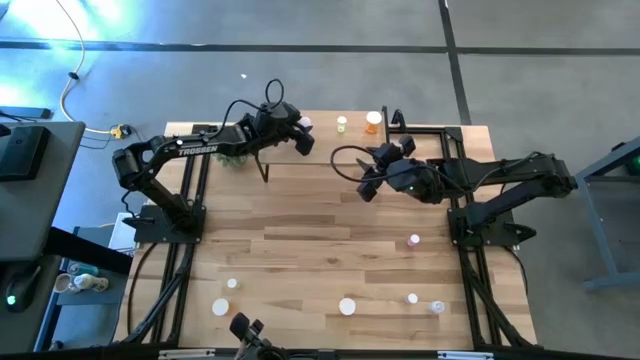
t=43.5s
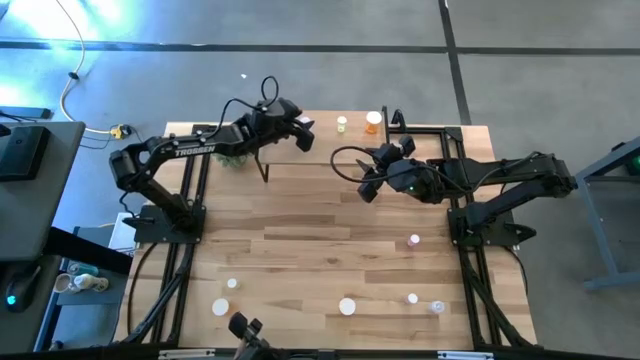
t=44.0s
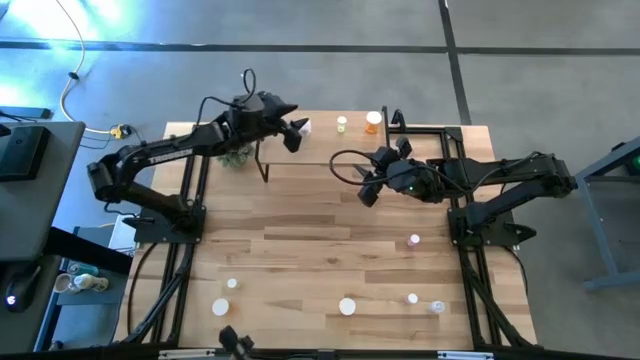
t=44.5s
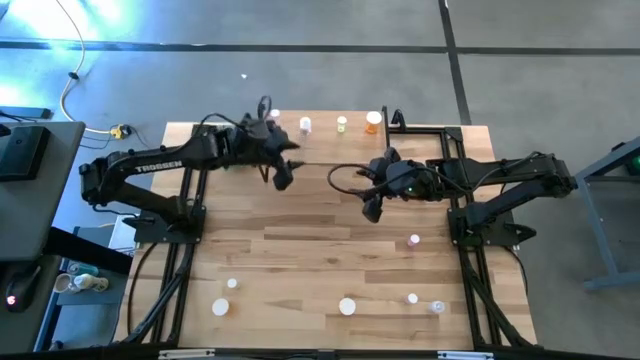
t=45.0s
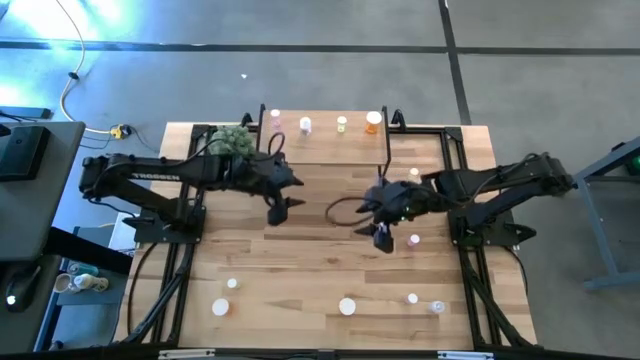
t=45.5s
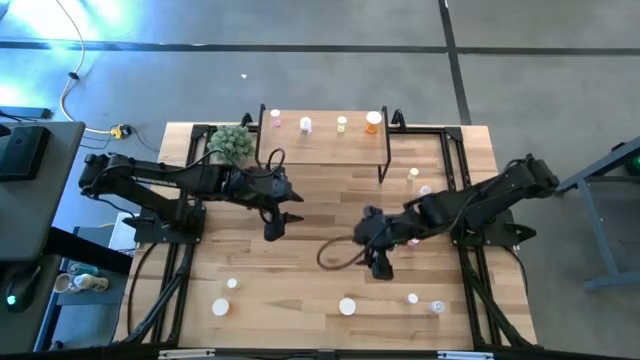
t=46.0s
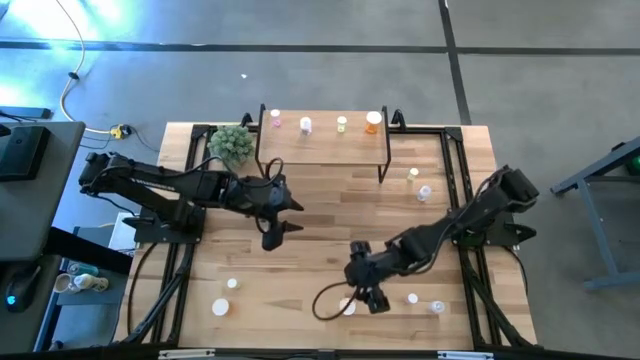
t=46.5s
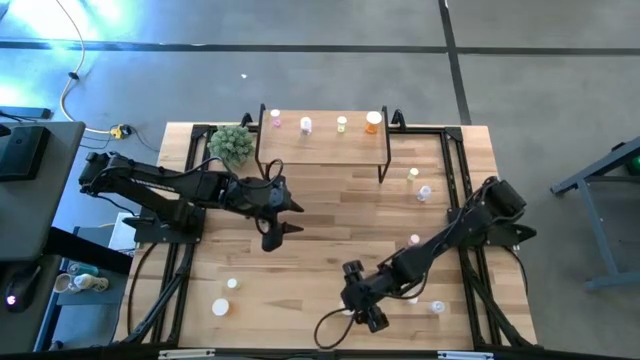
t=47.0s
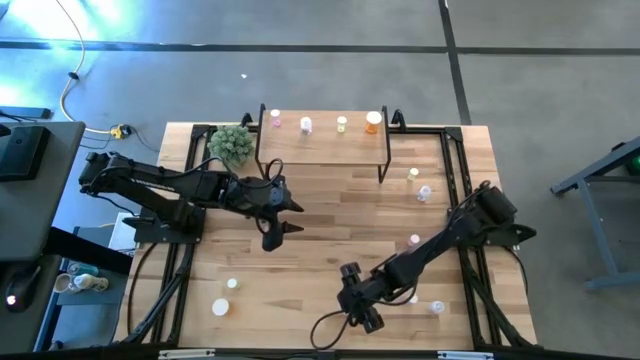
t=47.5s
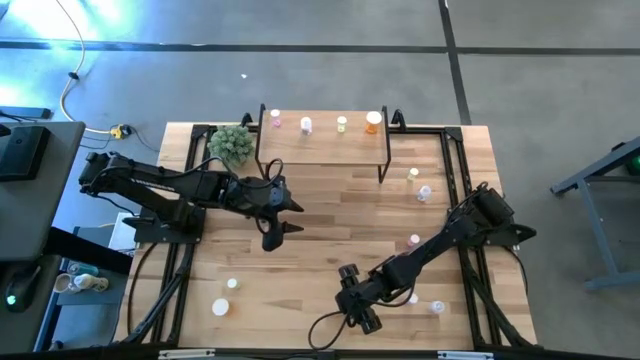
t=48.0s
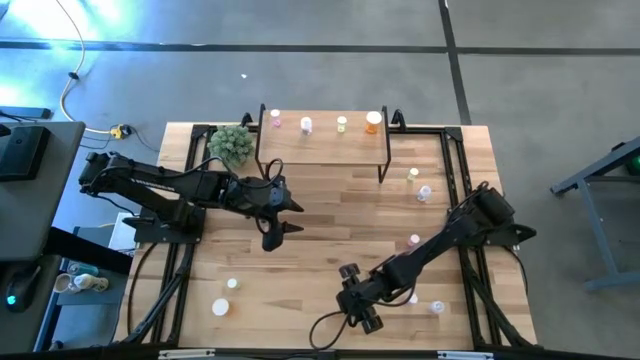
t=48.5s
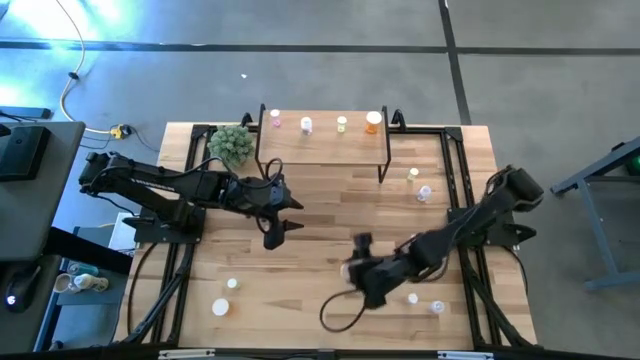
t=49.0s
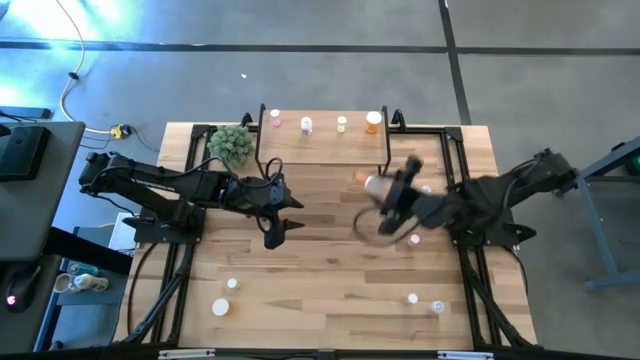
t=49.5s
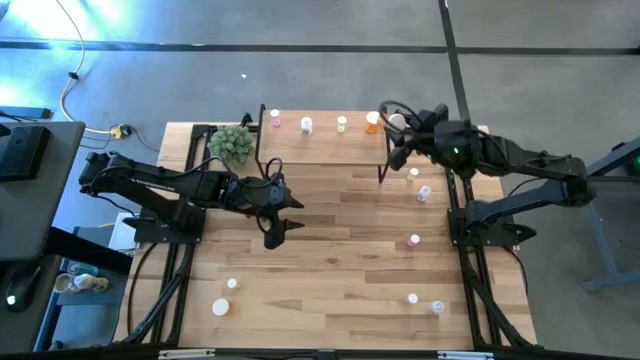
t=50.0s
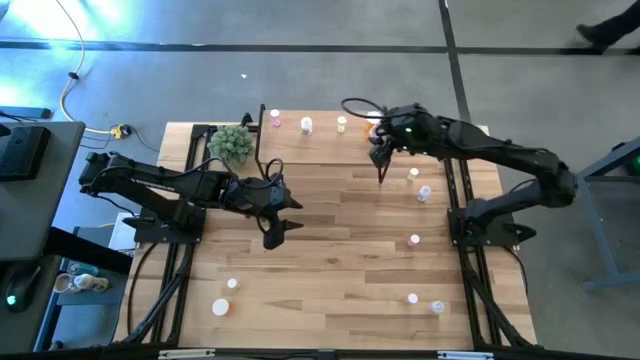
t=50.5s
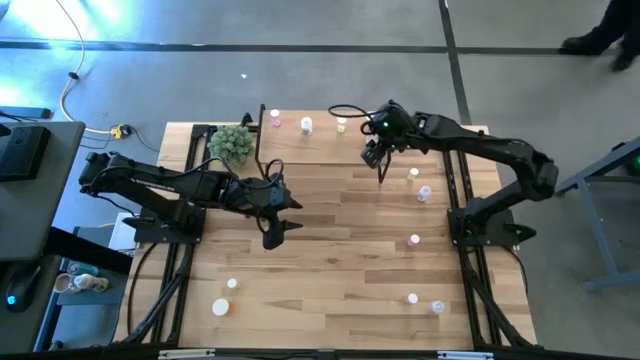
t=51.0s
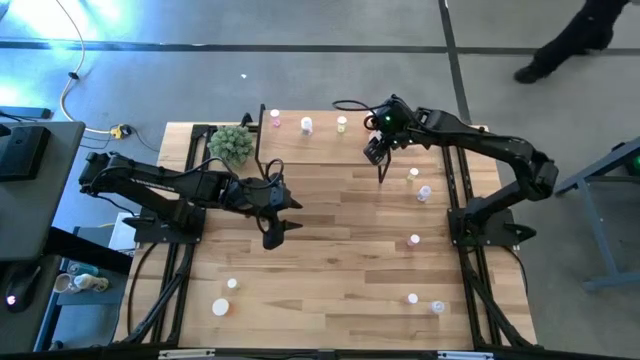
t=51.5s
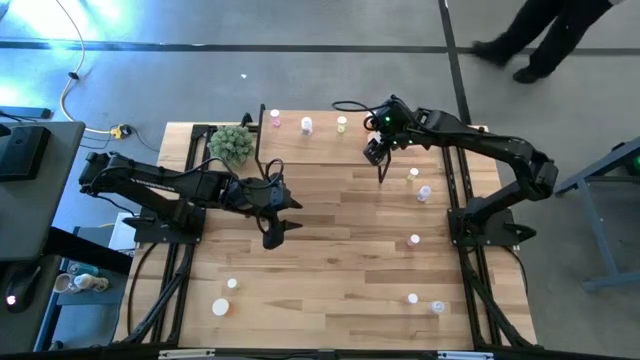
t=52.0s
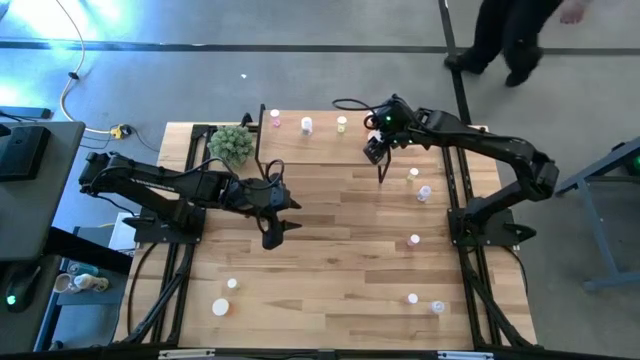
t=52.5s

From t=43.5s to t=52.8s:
Task: Pick and place medicine bottles onto shelf by color
Put the right orange pill bottle on the shelf aligned with the other orange pill bottle

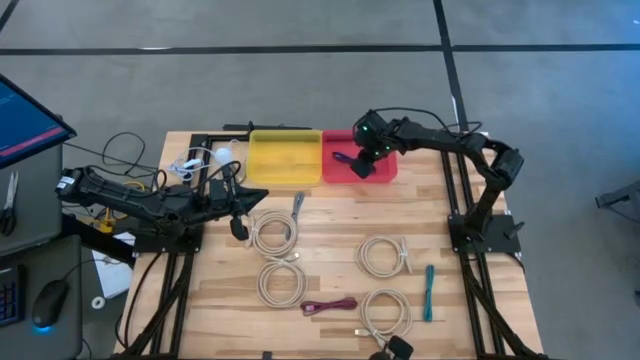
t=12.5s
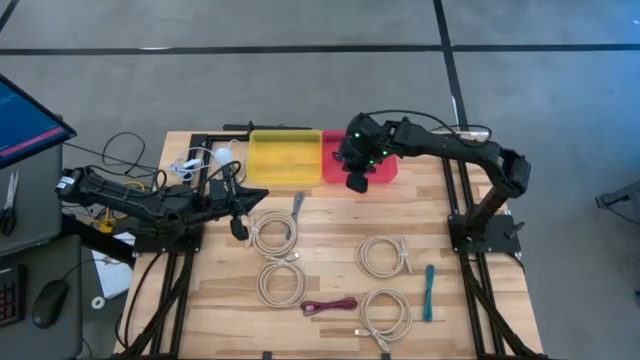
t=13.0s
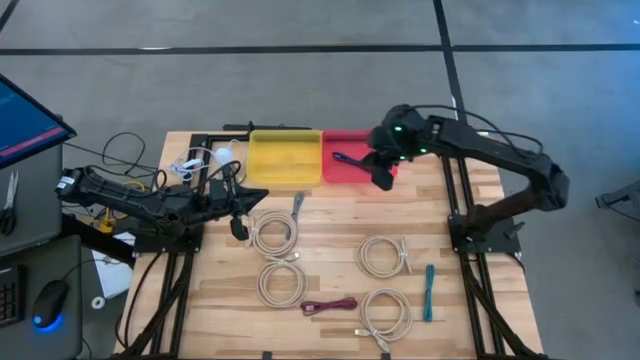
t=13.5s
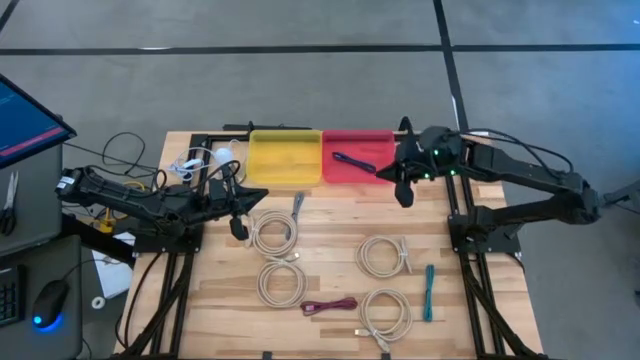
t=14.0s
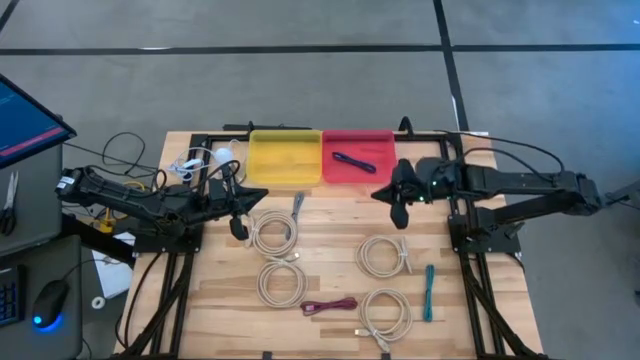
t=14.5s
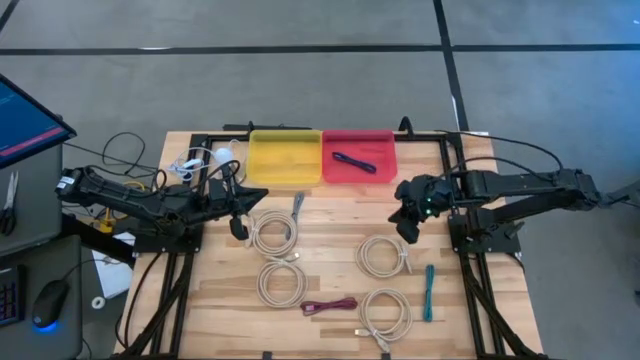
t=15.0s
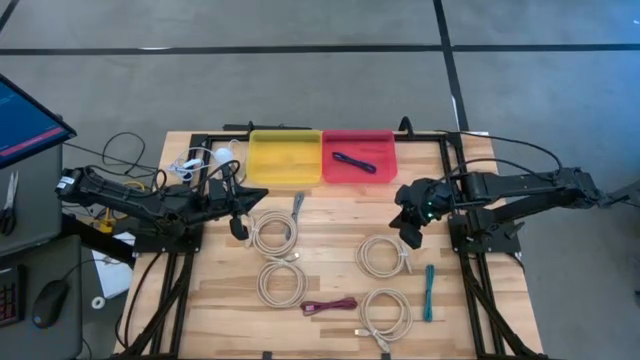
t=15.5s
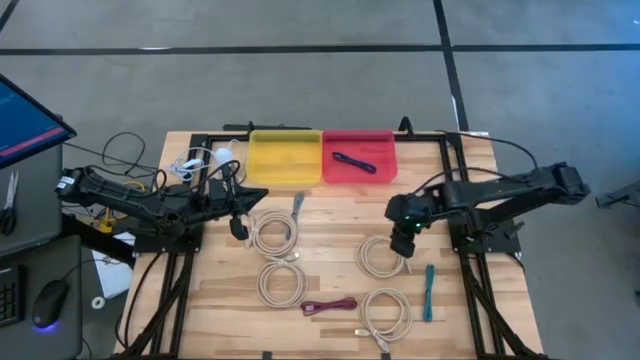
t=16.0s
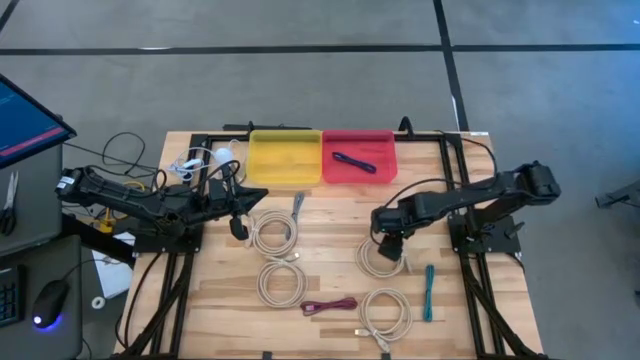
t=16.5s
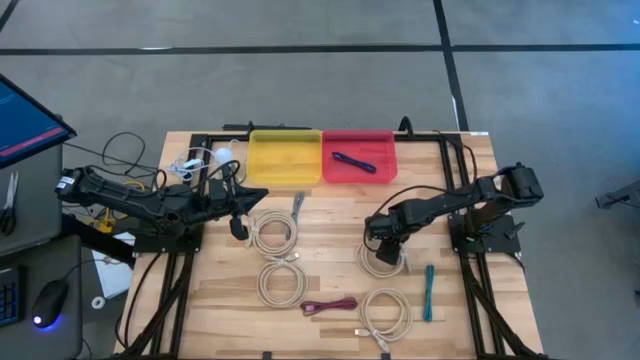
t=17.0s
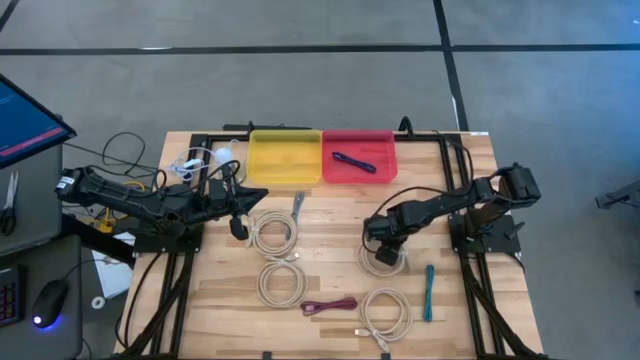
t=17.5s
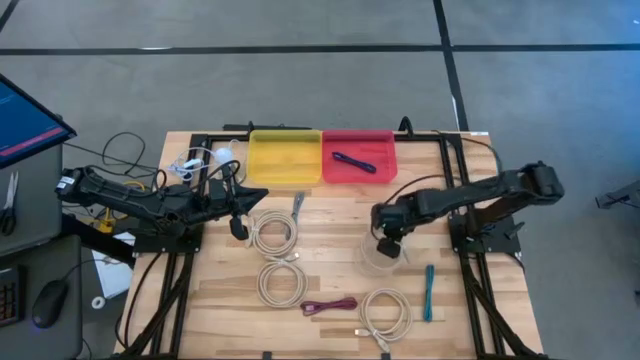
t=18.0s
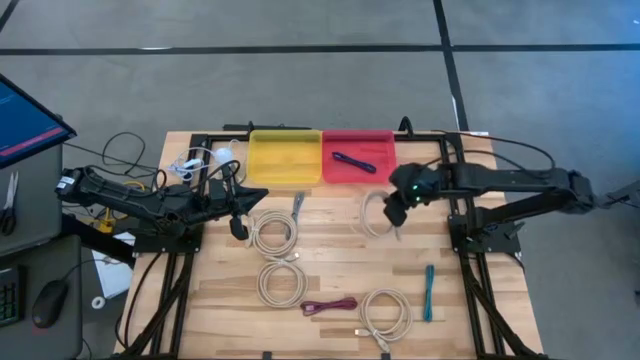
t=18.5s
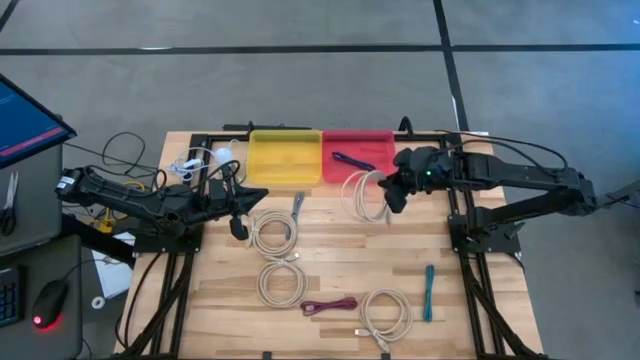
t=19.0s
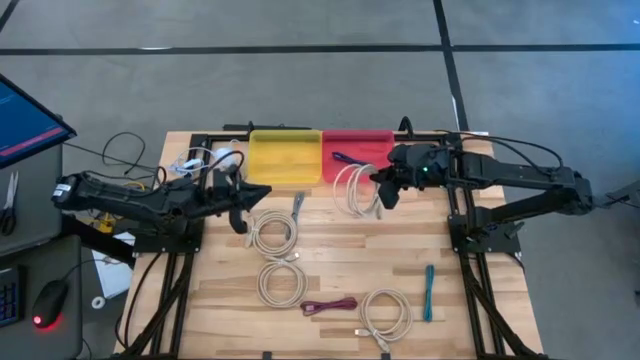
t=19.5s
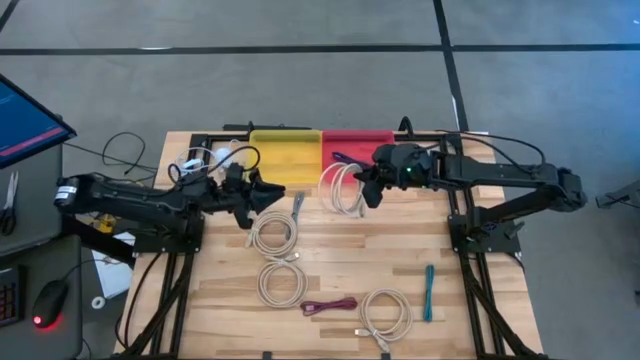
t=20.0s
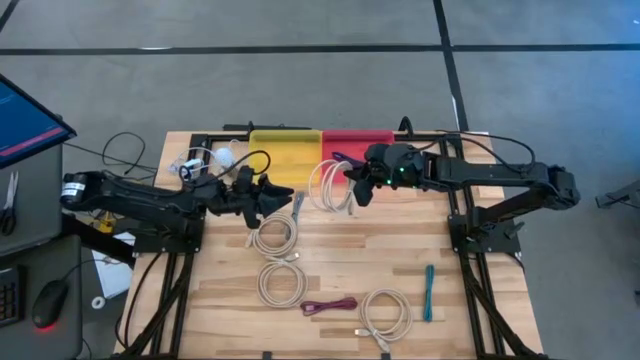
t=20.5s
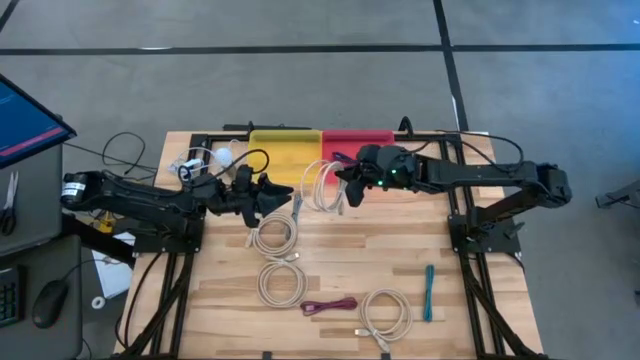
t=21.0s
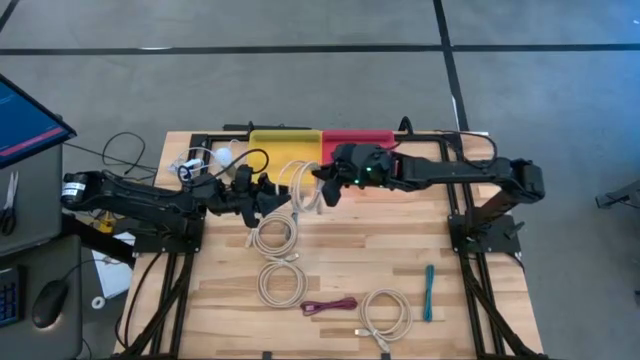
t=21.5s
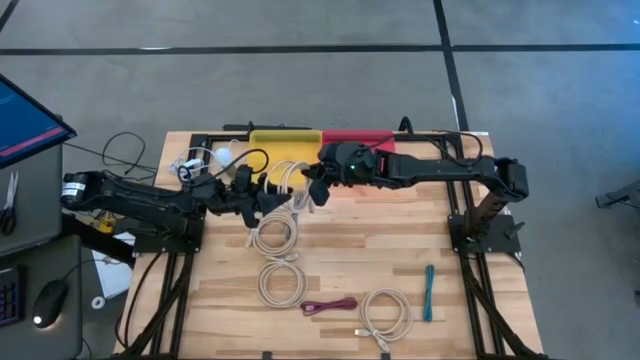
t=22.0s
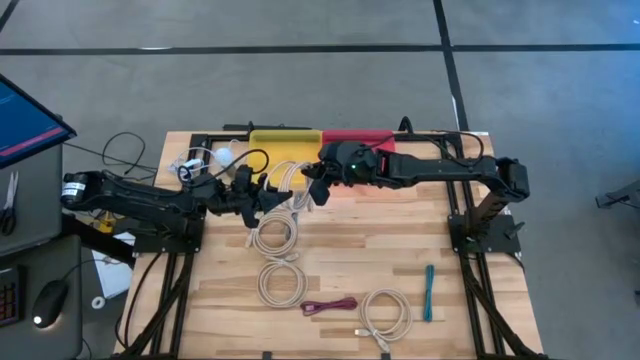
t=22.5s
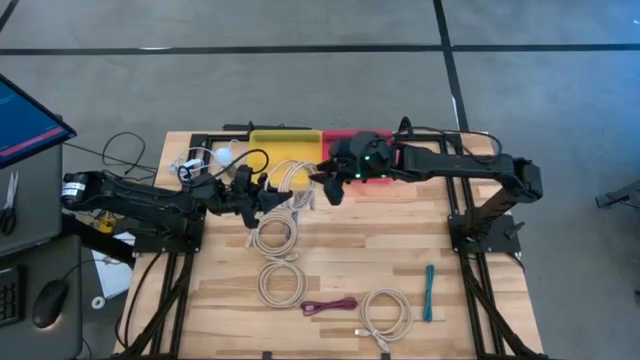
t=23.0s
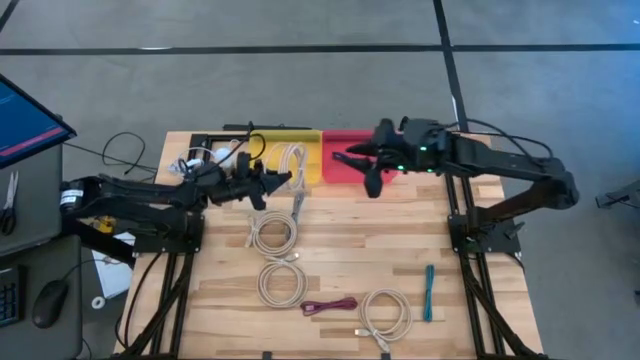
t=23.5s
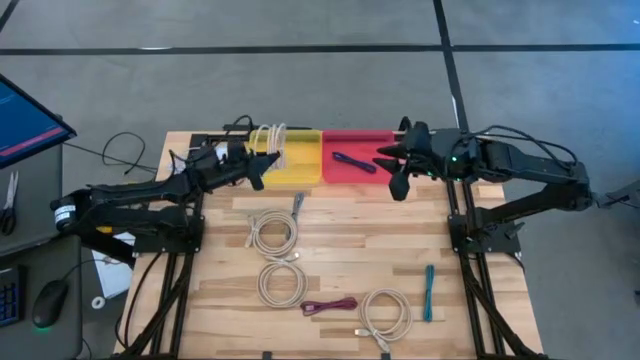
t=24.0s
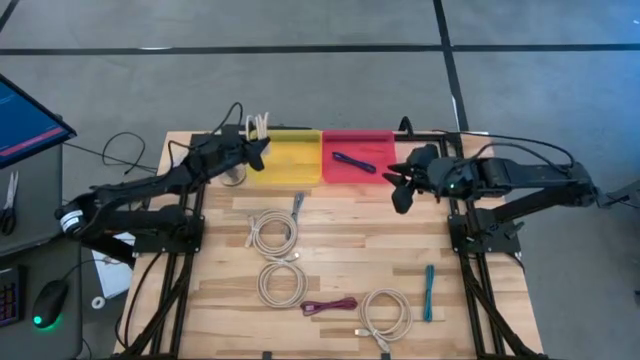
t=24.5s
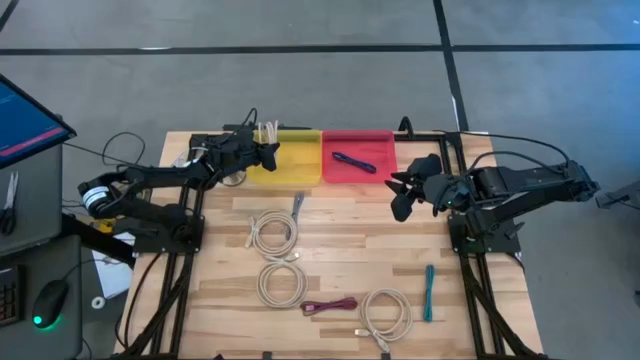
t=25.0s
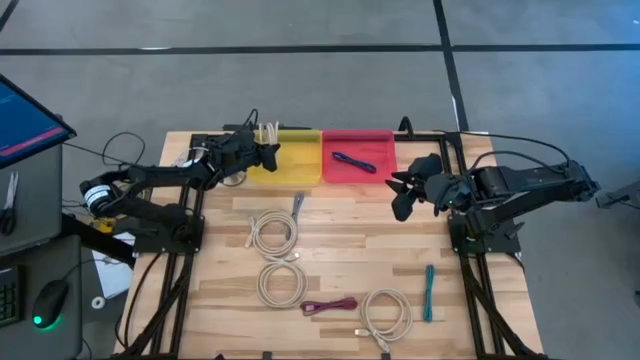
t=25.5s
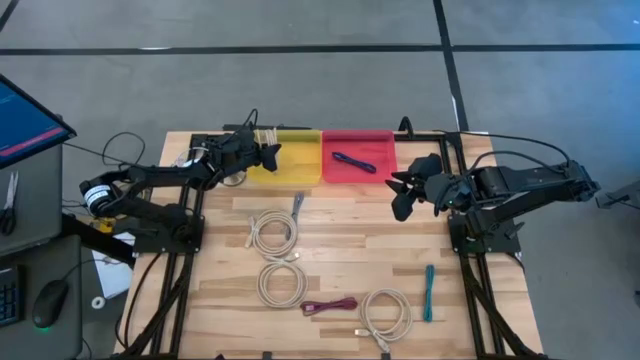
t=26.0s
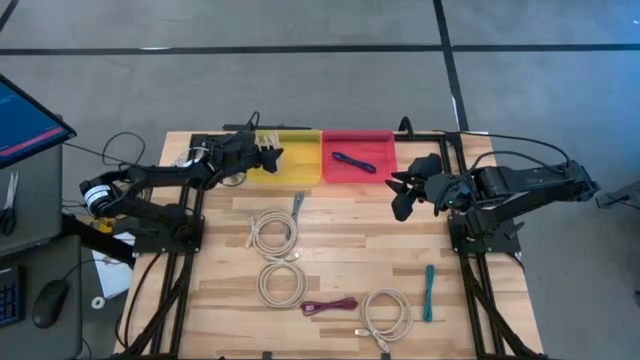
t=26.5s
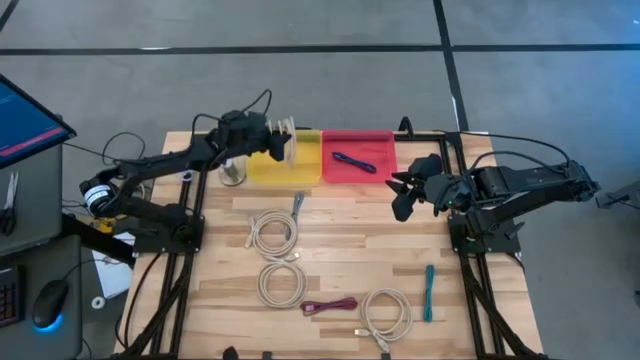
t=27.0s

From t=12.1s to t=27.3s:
Task: Pick & Place USB Port
Put the large white charger cable into the yellow bin
